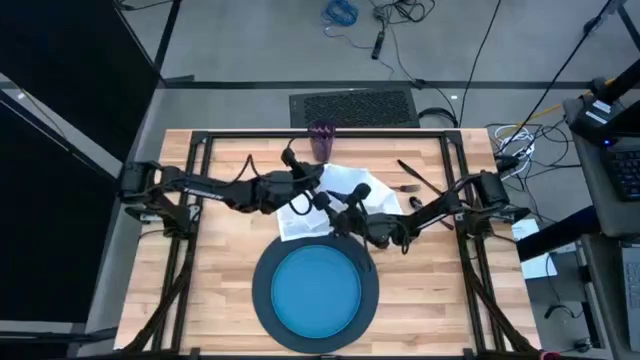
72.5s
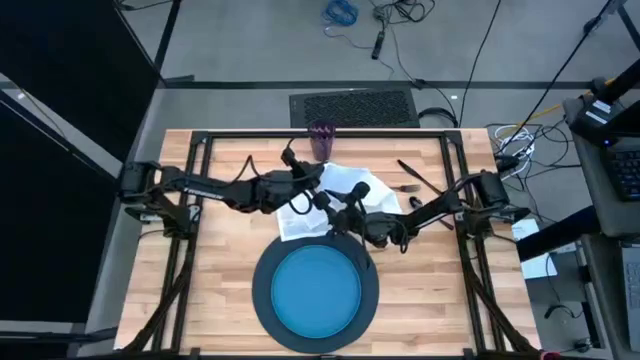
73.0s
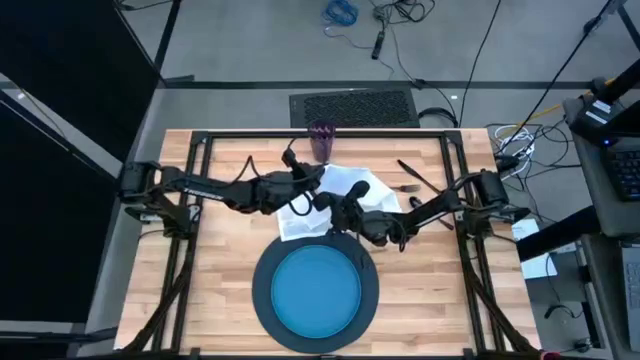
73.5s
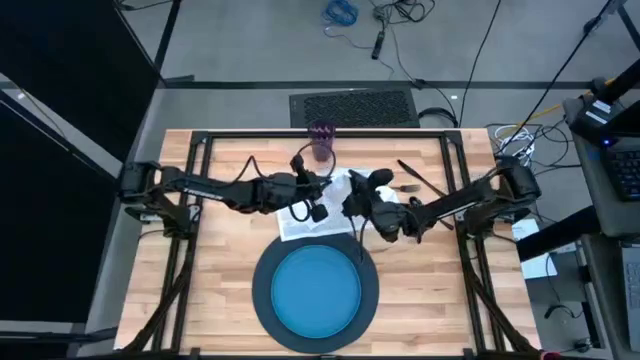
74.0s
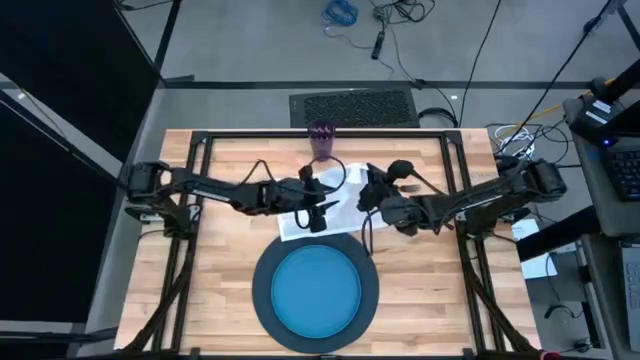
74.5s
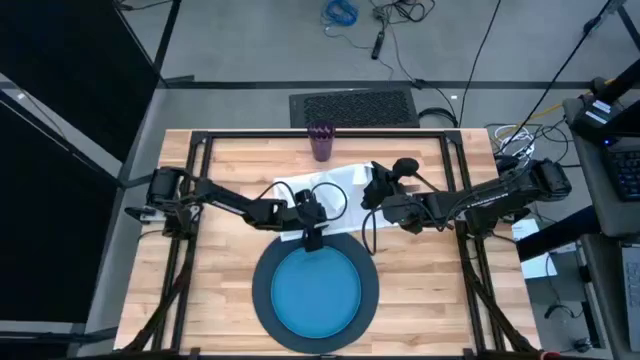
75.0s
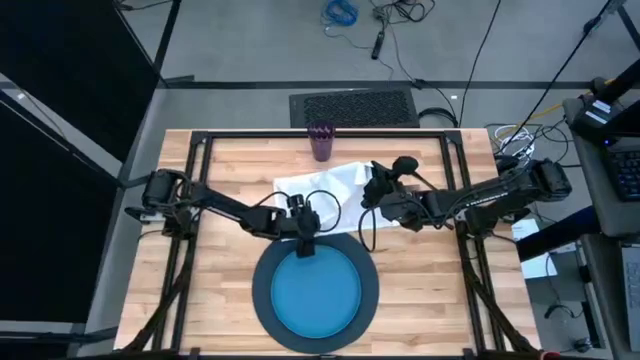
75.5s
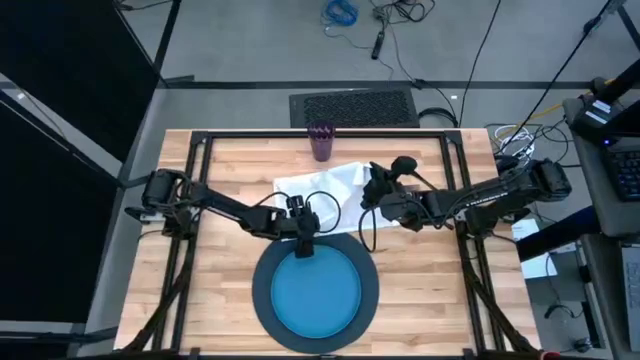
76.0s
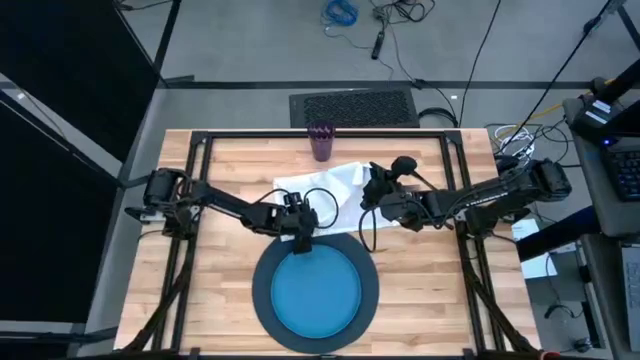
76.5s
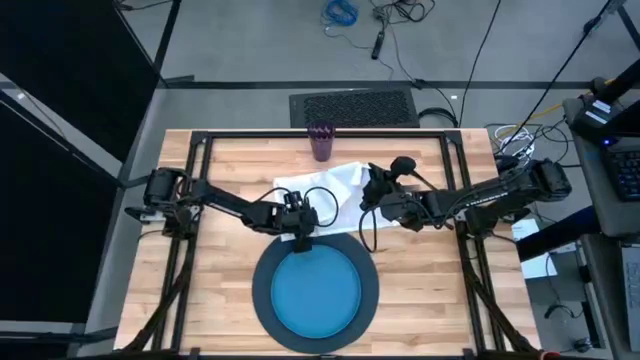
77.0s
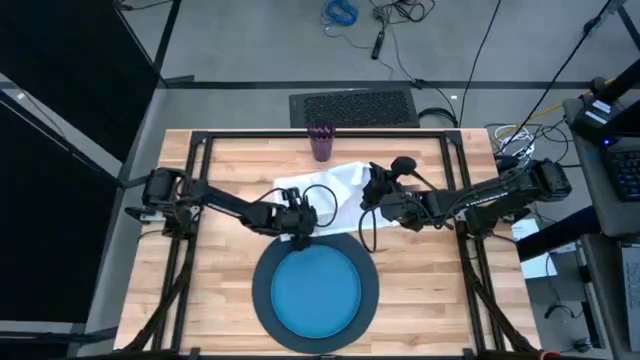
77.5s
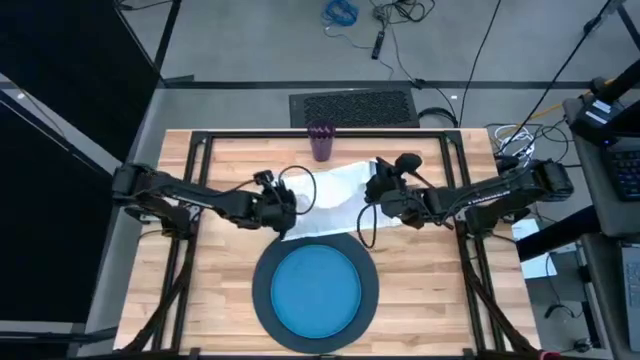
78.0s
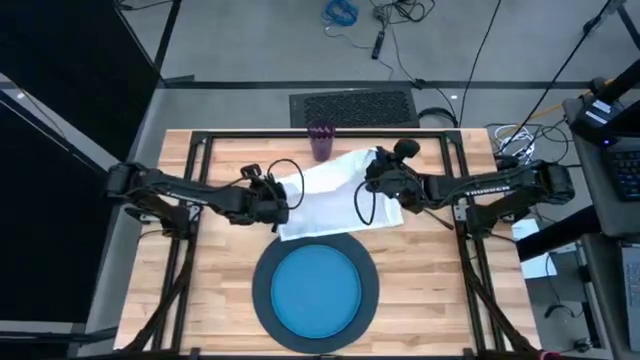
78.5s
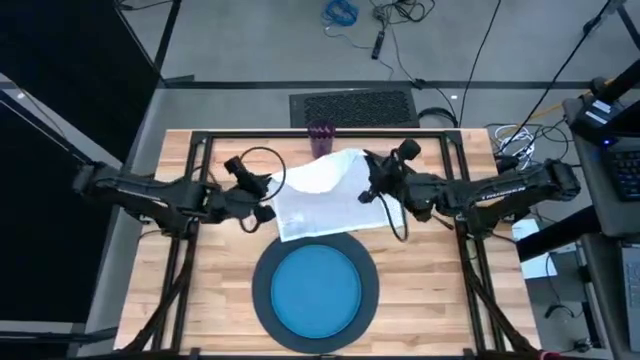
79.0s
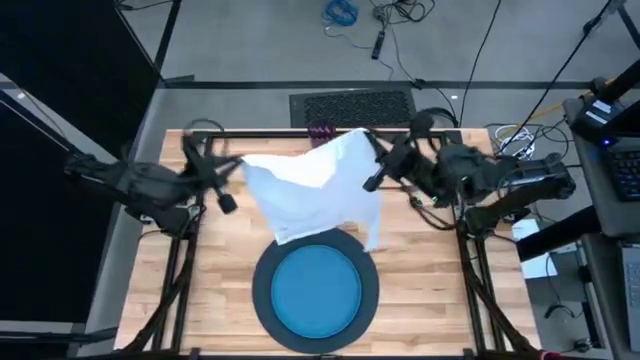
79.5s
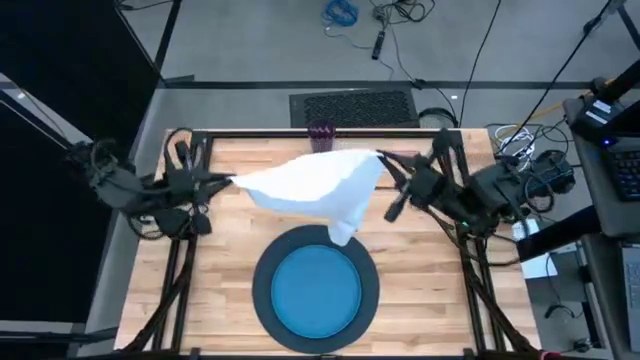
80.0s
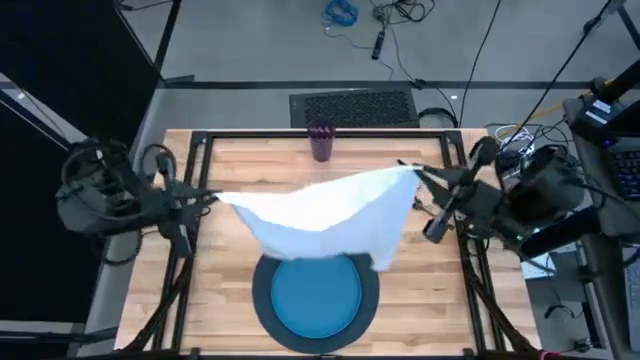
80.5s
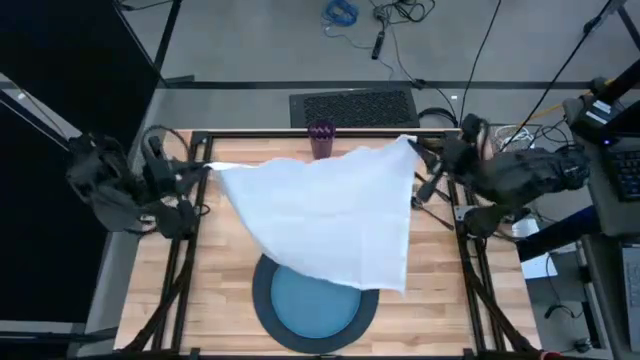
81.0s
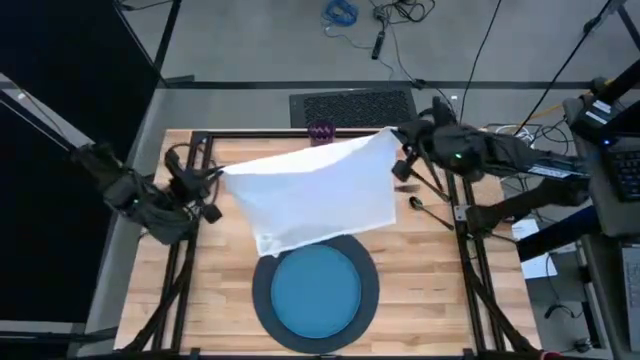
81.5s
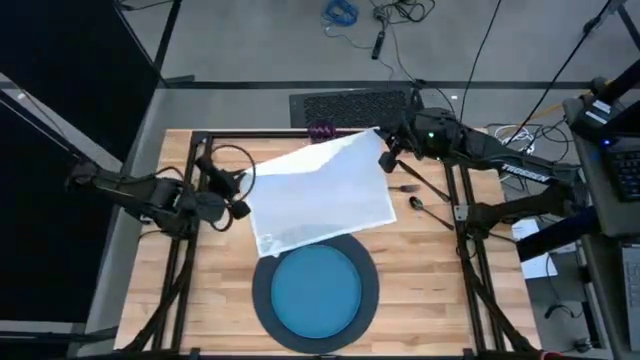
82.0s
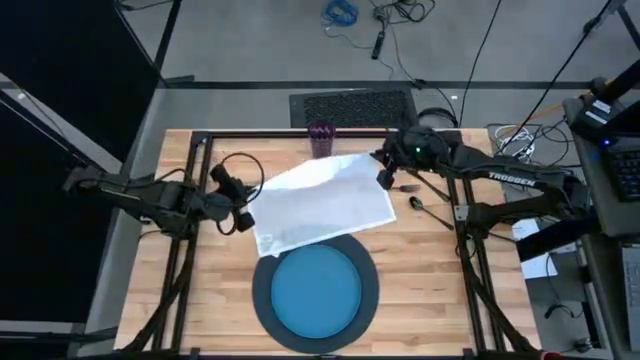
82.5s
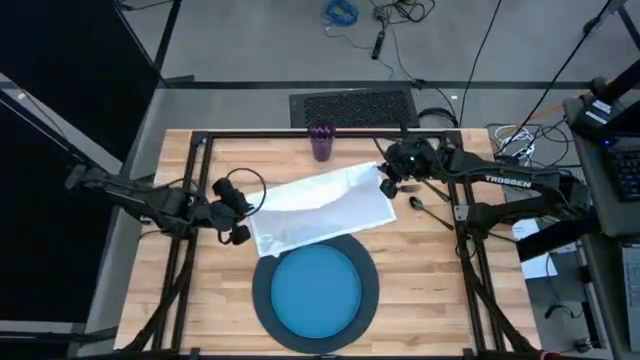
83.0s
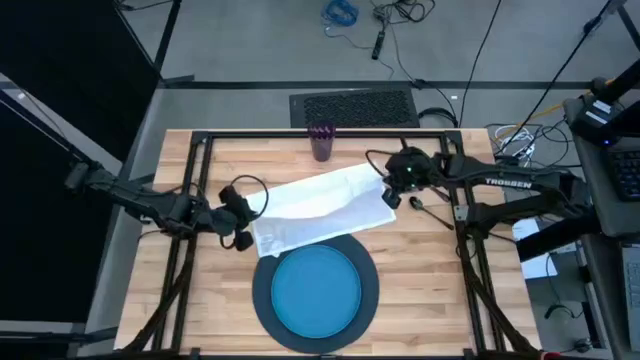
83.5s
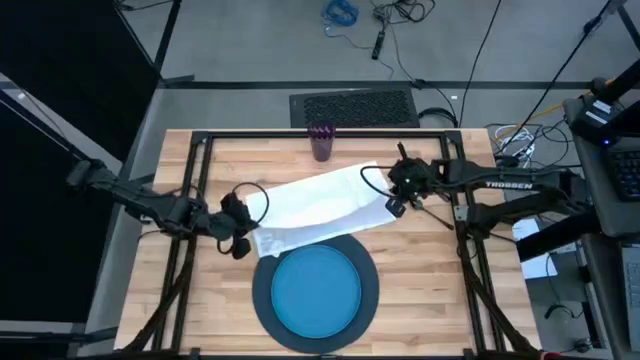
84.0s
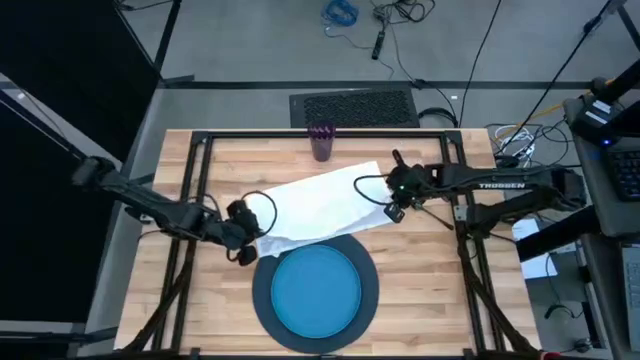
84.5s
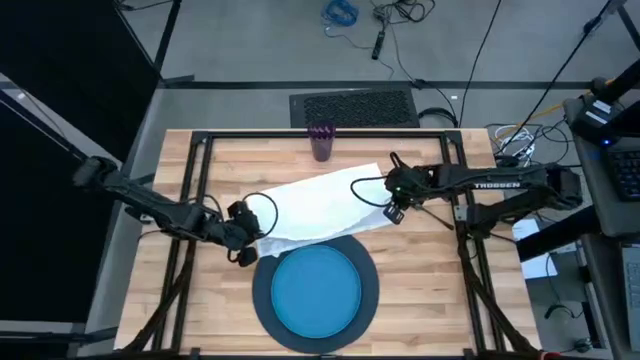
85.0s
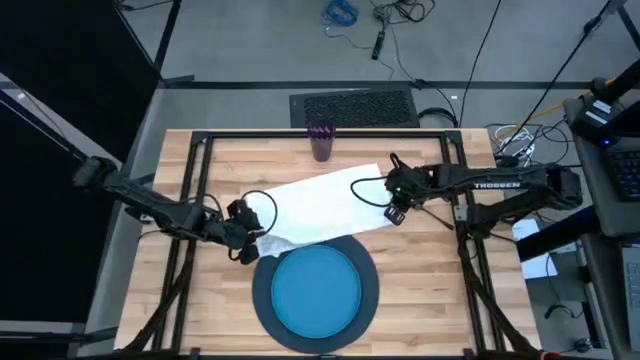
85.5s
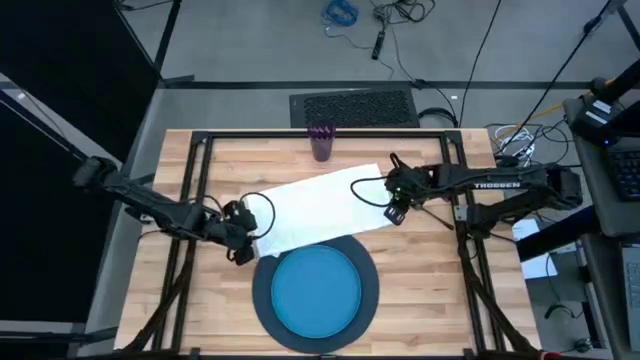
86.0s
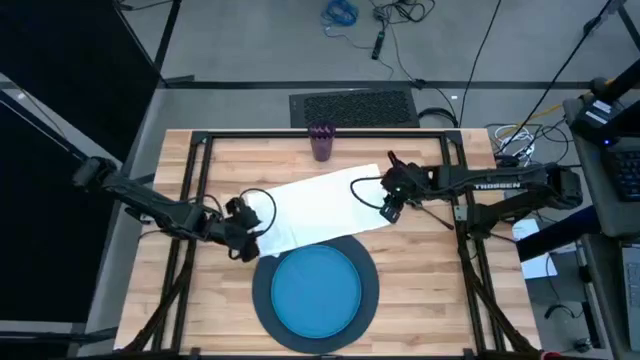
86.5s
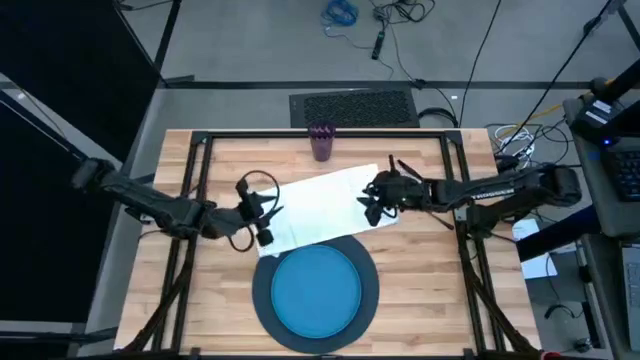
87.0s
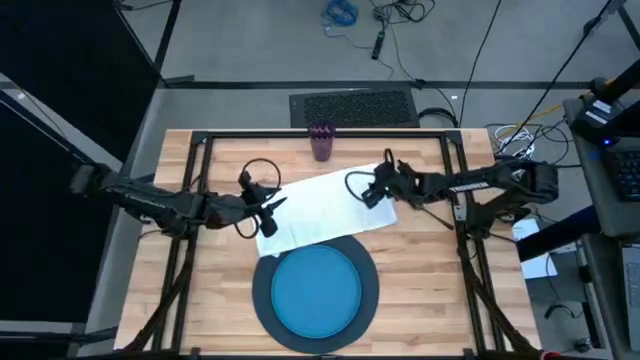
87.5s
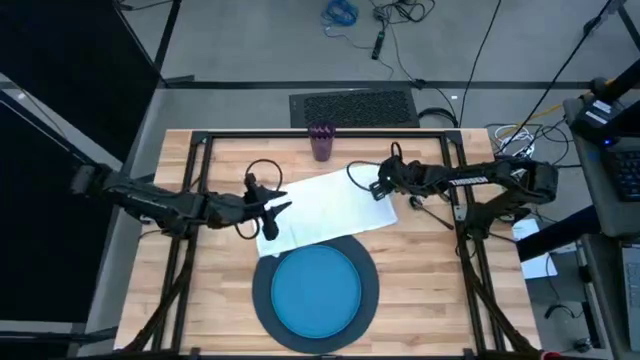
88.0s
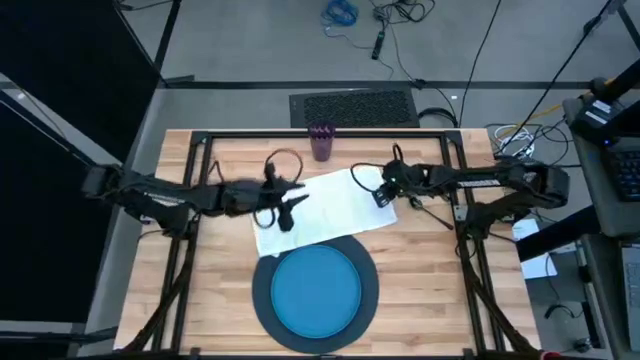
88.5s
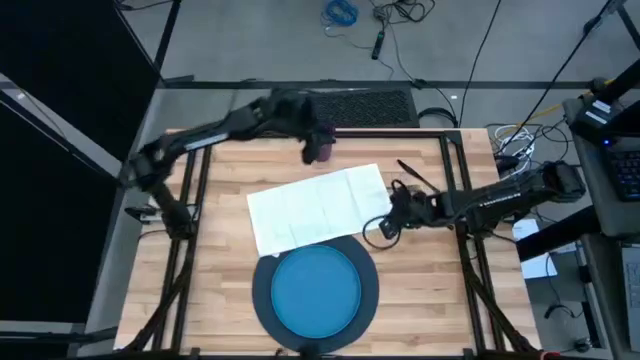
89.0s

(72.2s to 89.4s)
Task: Set table place
Fold the white table napkin on the table

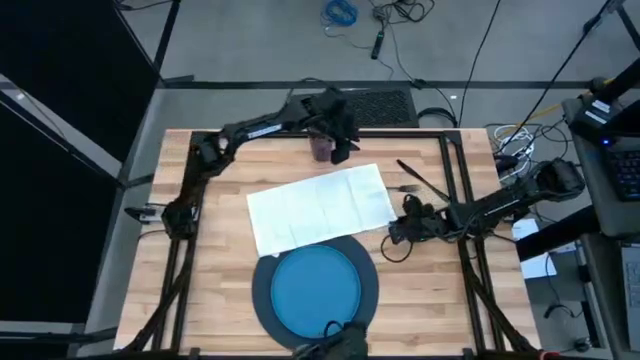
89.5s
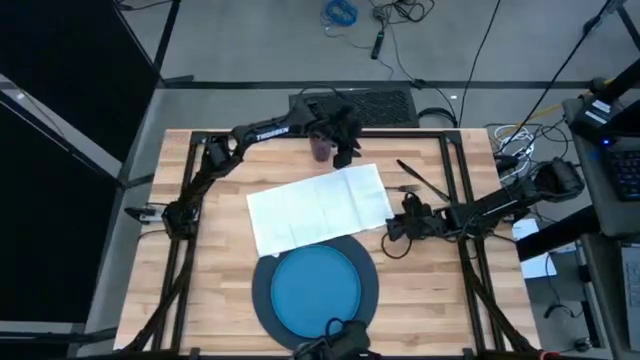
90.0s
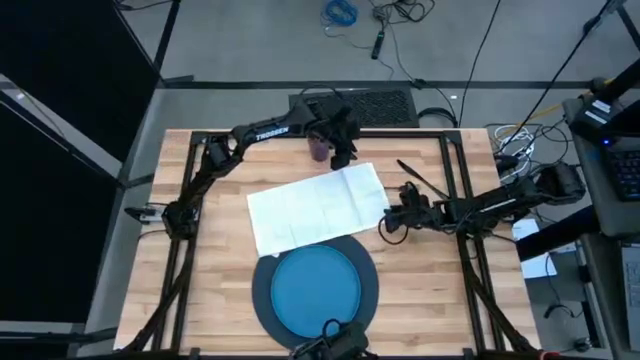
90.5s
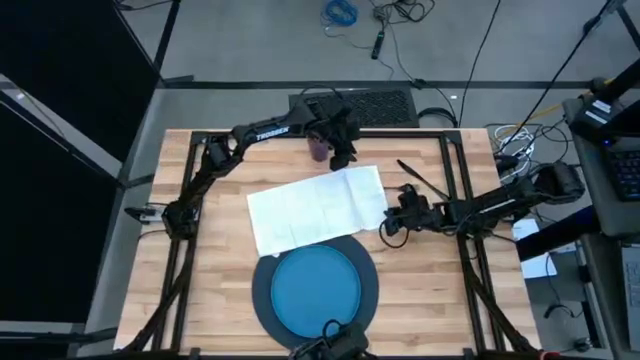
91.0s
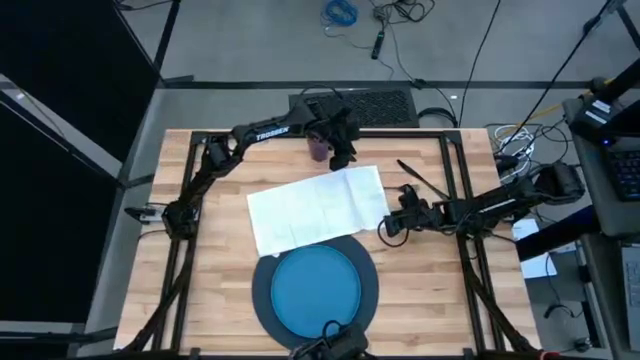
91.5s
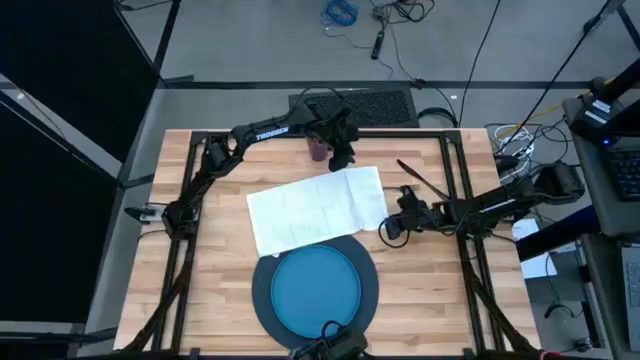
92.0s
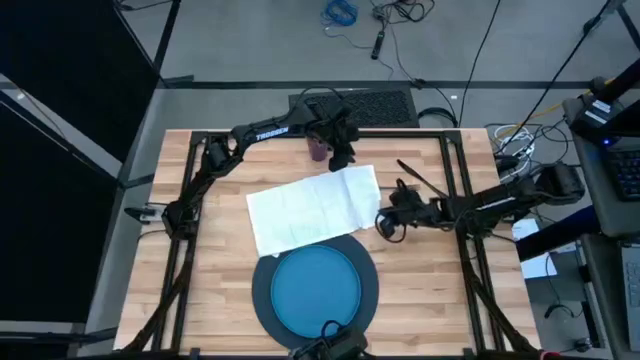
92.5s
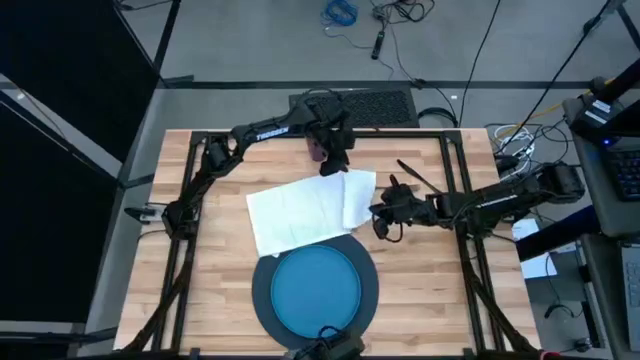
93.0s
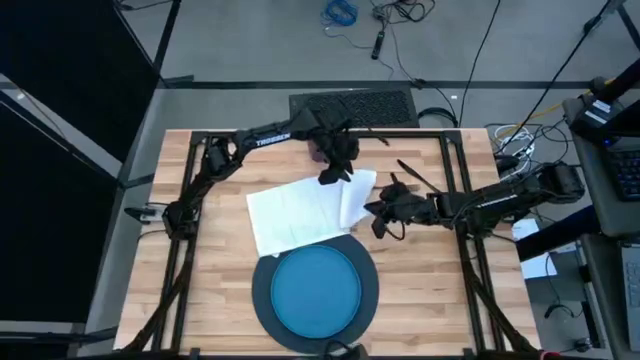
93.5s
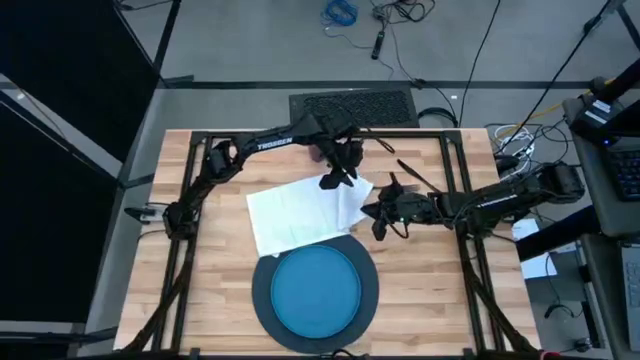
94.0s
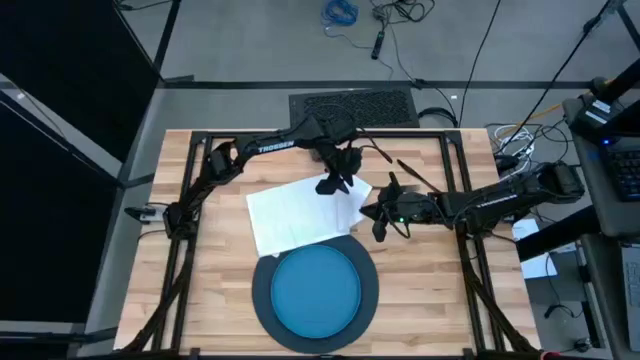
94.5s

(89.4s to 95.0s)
Fold the white table napkin on the table
